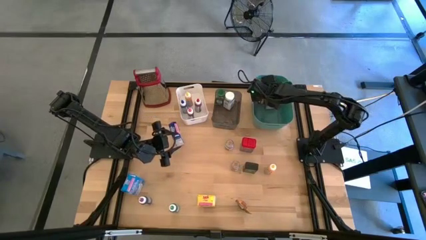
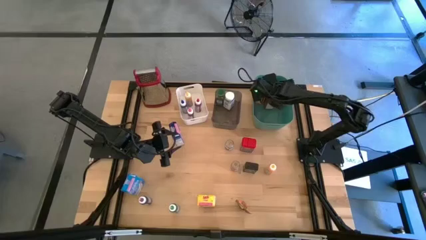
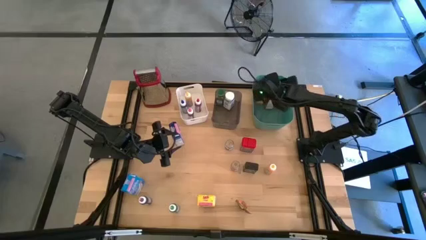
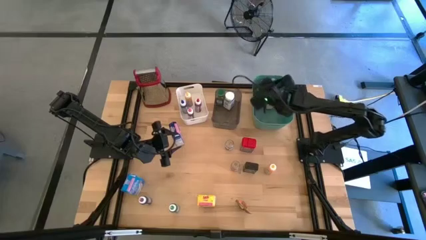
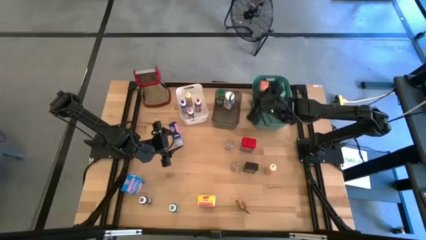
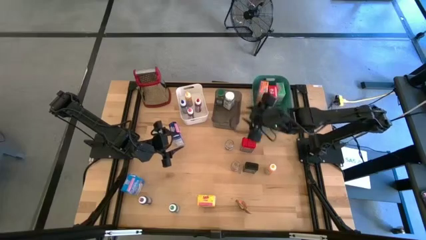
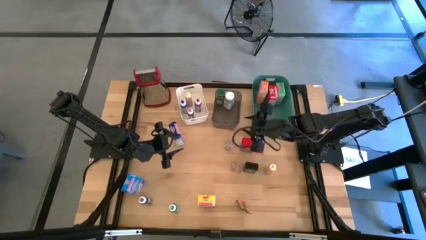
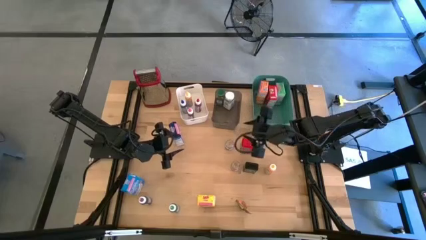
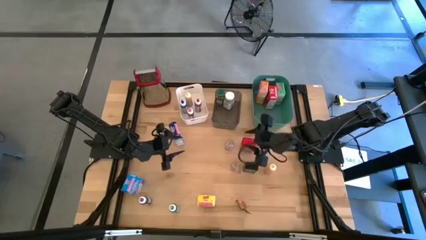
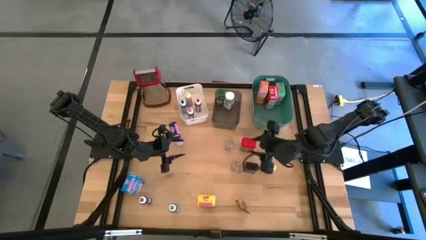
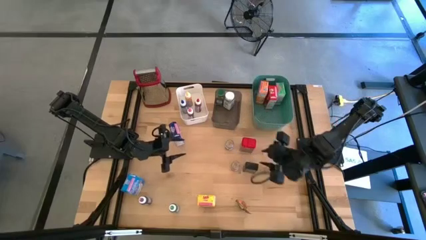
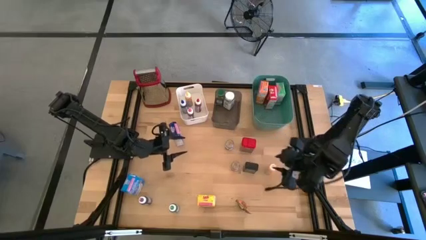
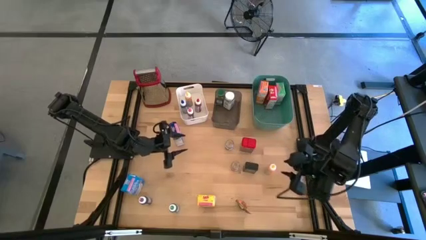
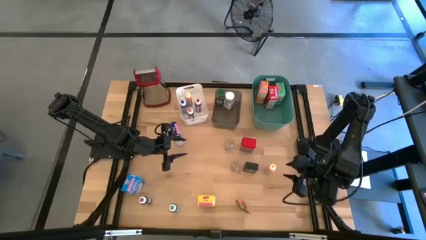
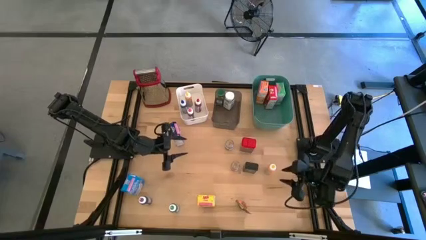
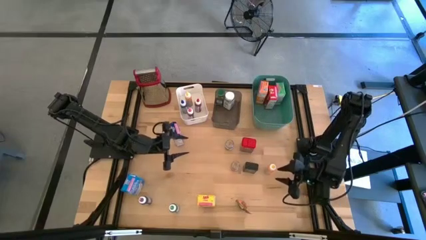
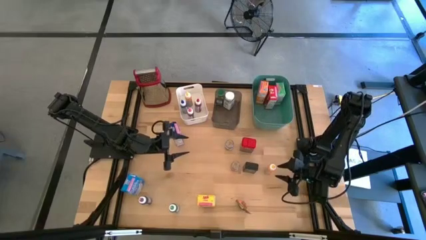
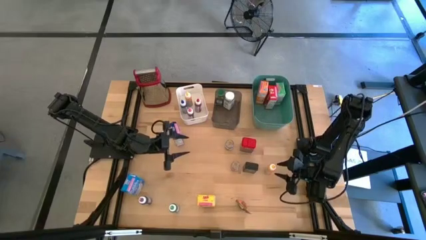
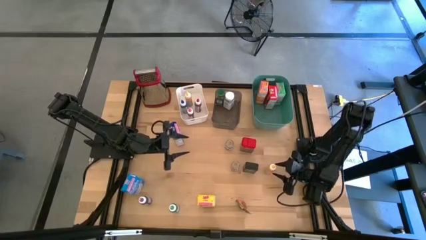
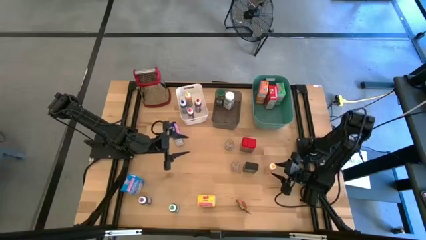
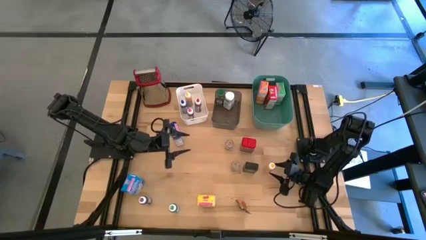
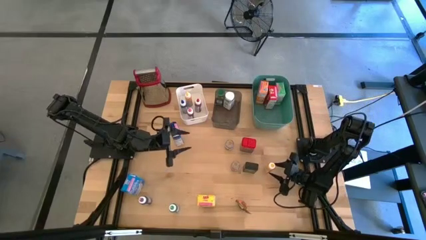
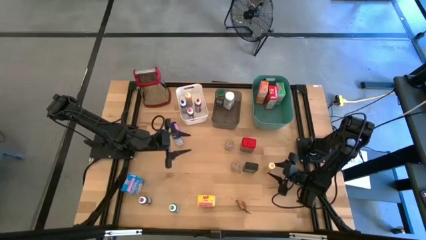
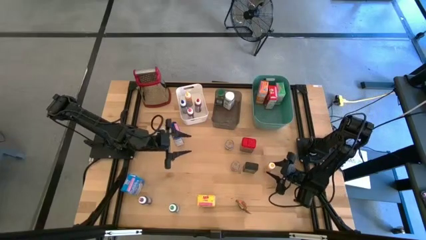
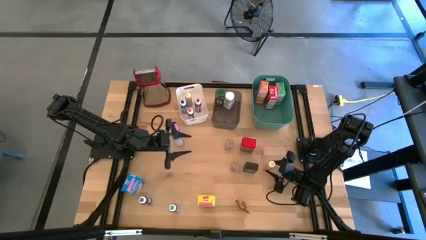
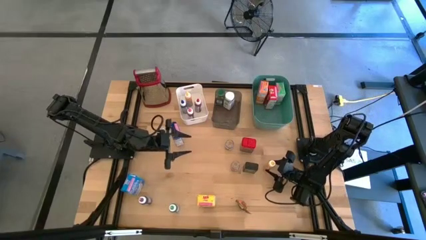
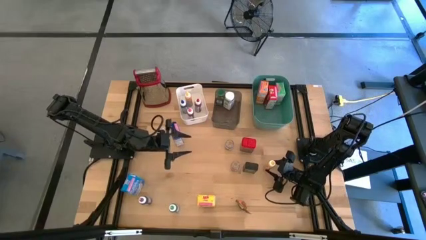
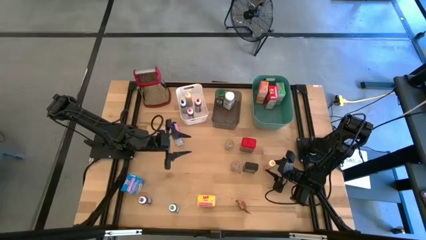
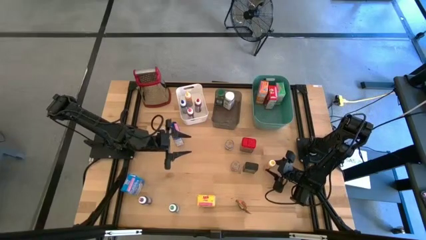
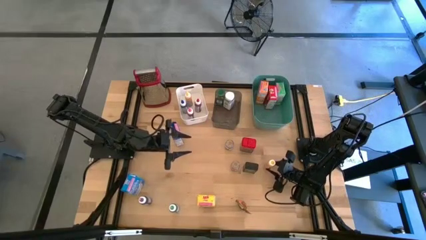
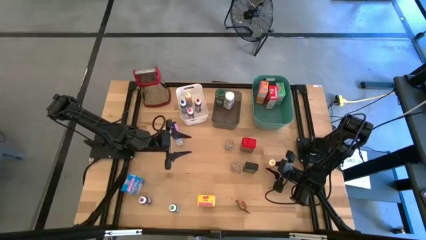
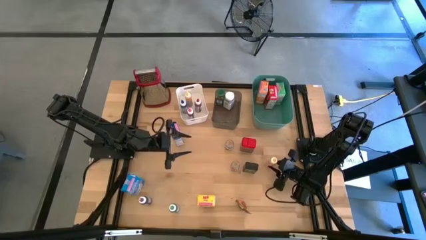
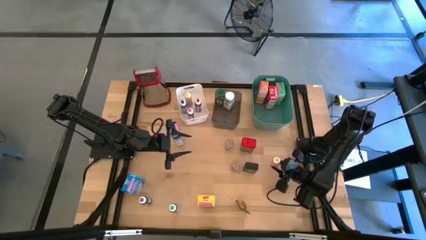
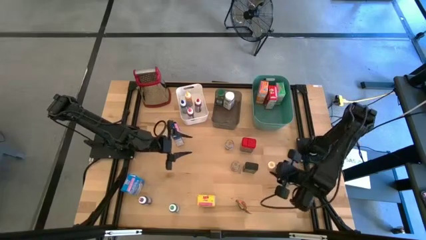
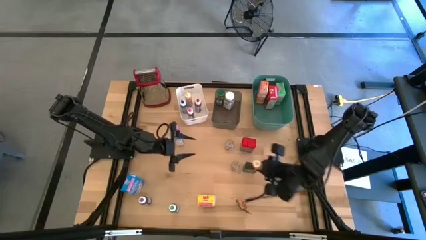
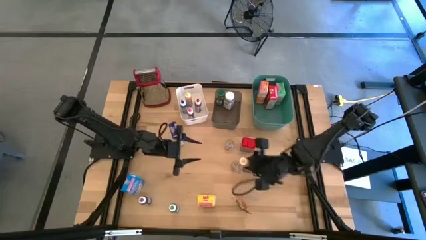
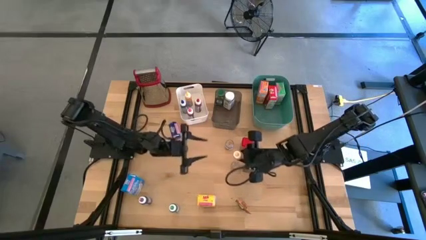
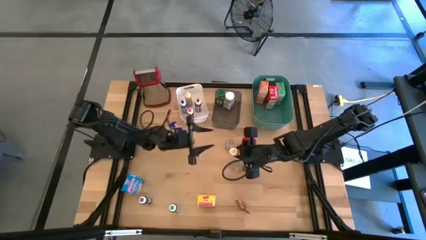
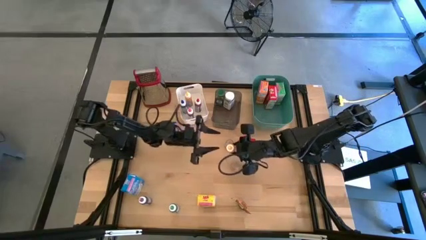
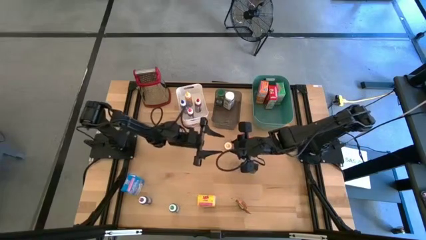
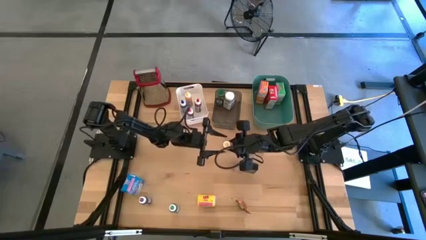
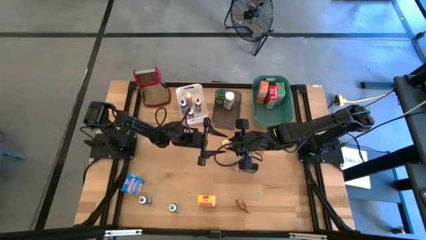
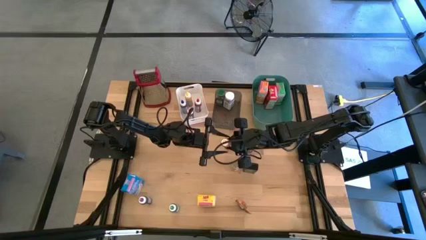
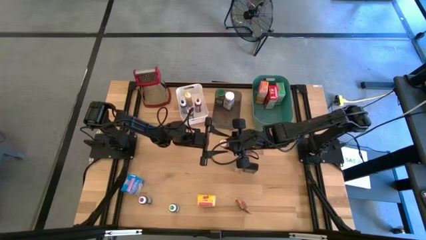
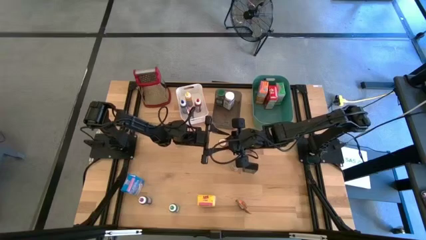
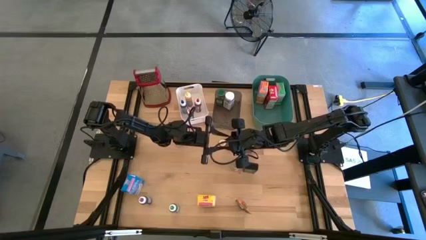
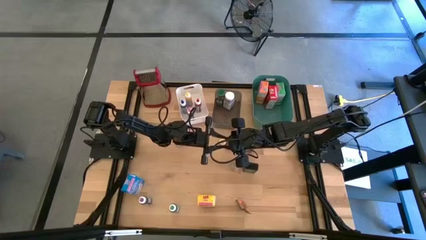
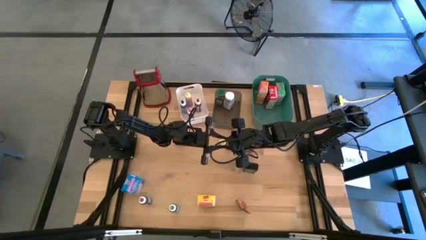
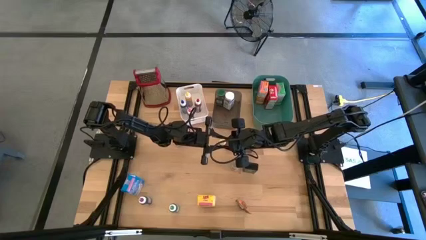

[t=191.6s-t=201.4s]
Task: Pick & Place Kitchen Items
Put the yellow food coloring into the white bin

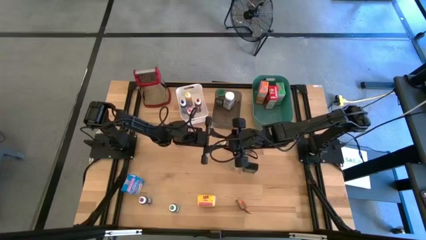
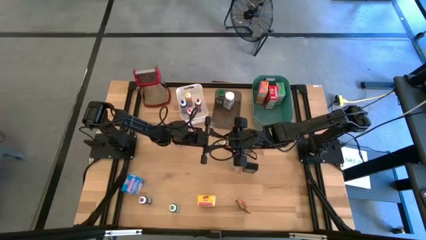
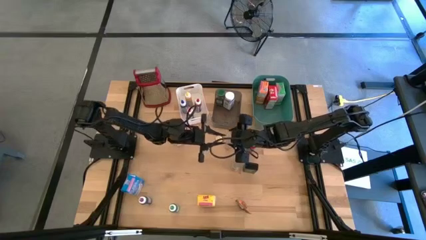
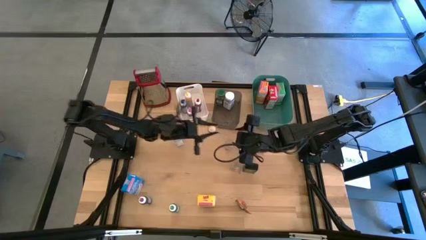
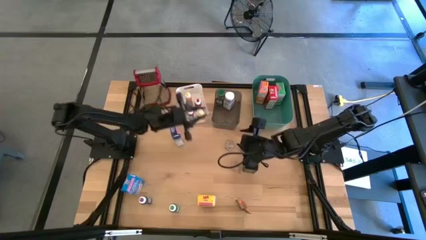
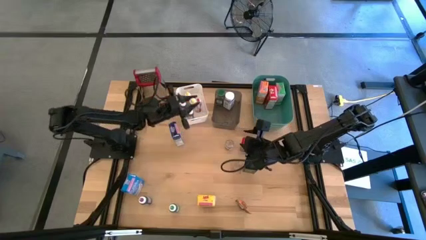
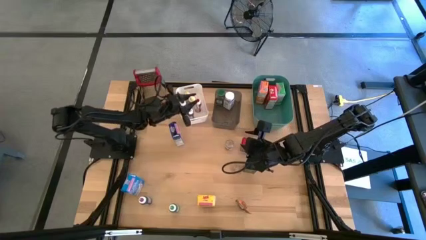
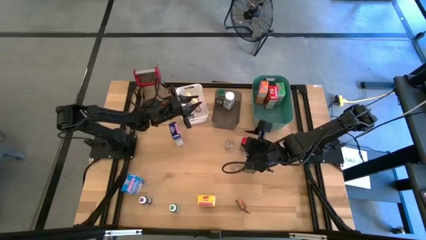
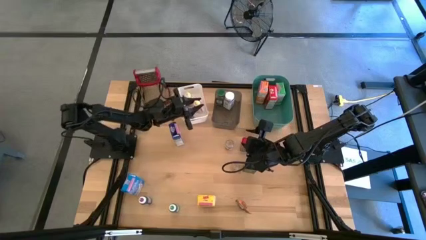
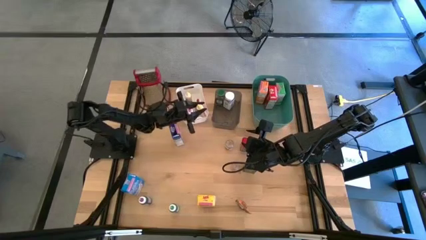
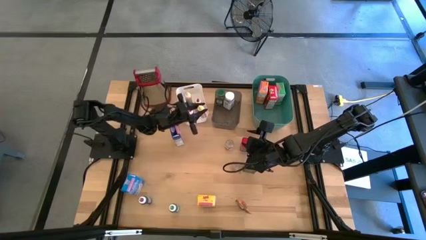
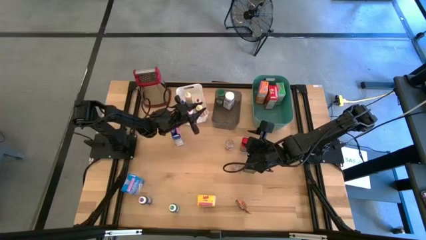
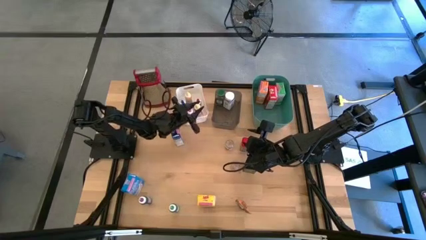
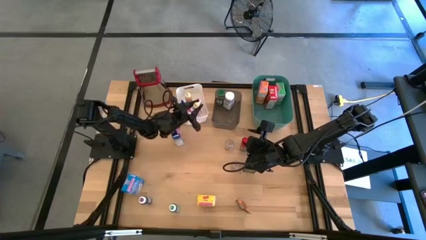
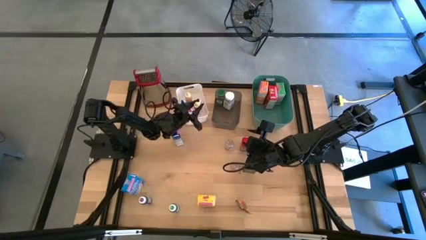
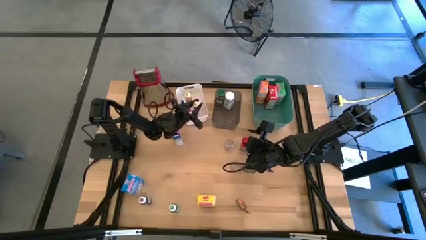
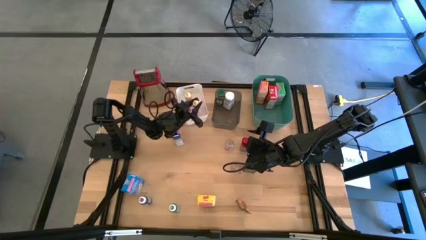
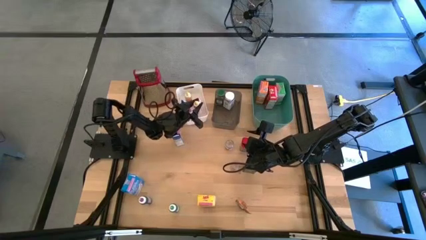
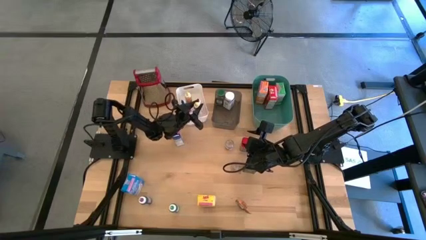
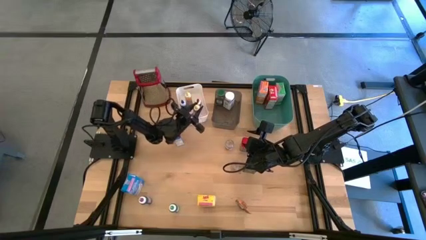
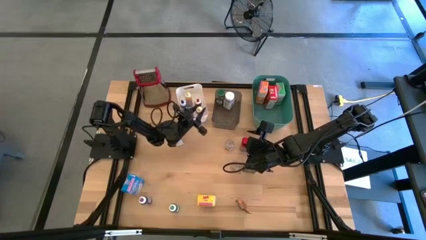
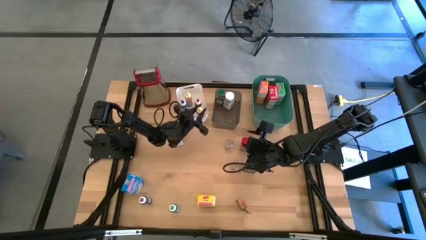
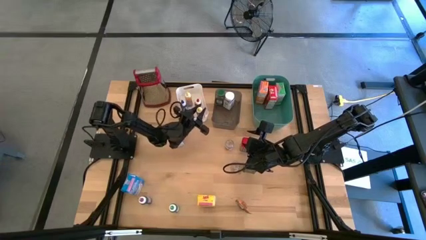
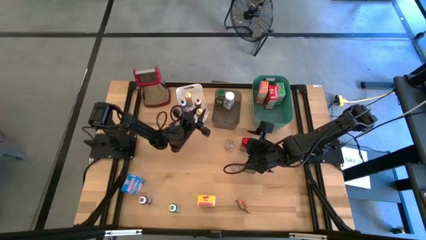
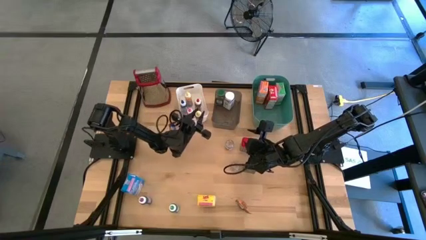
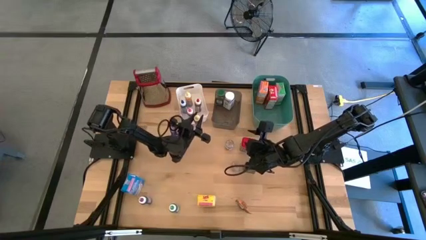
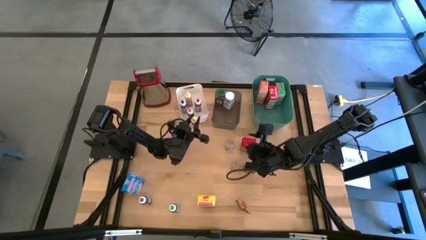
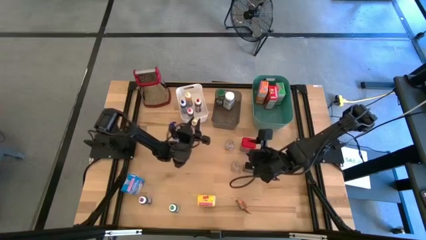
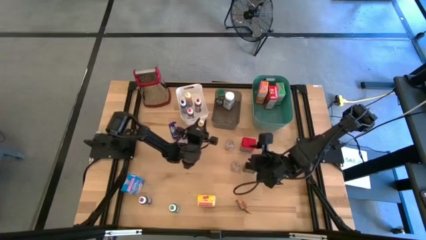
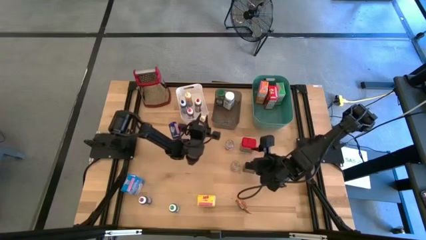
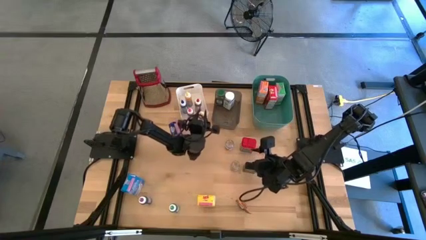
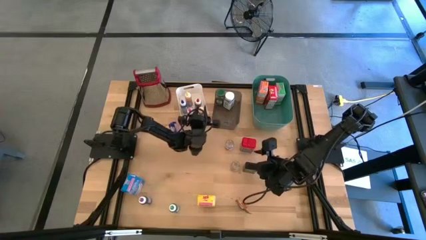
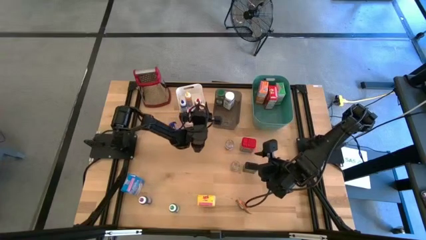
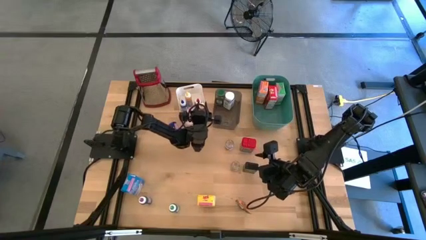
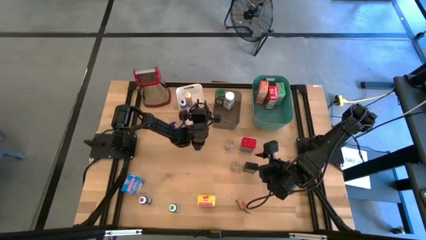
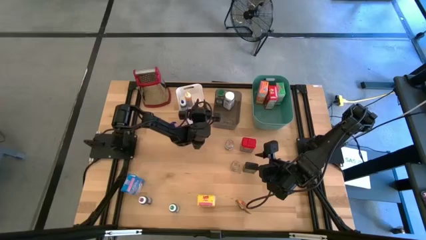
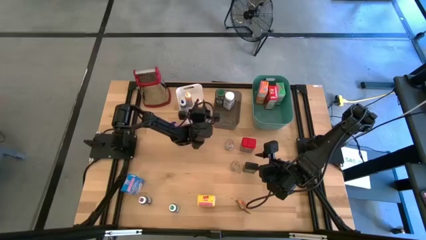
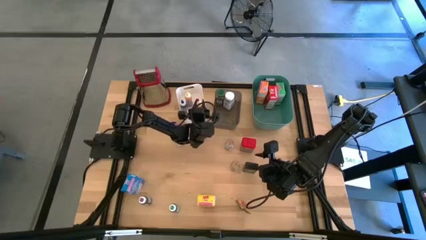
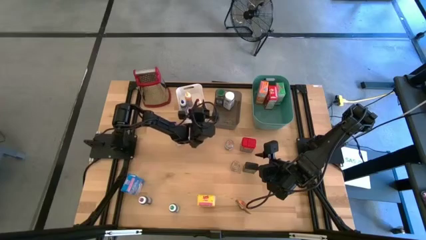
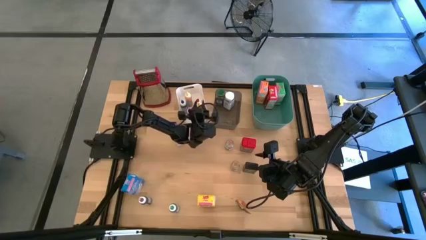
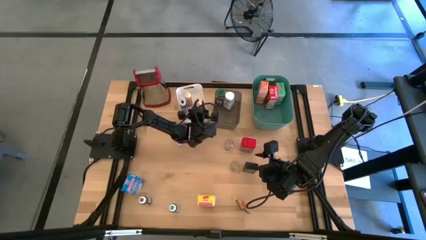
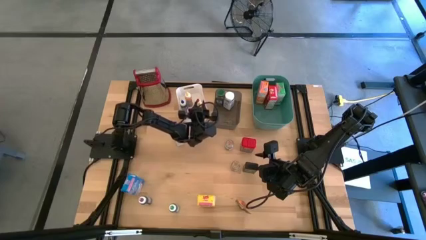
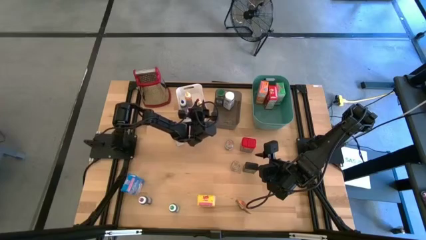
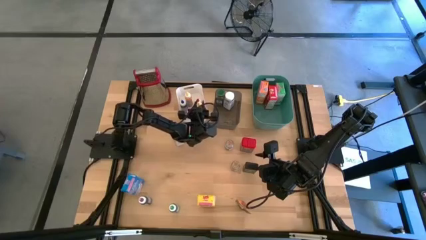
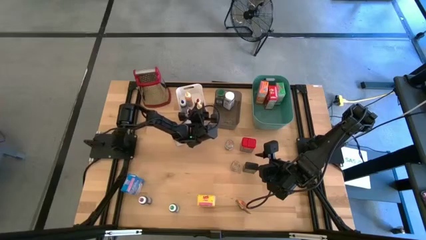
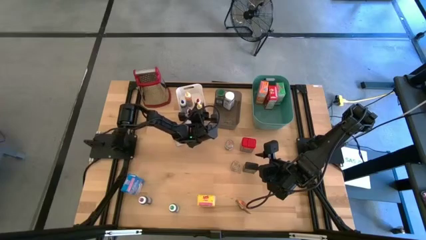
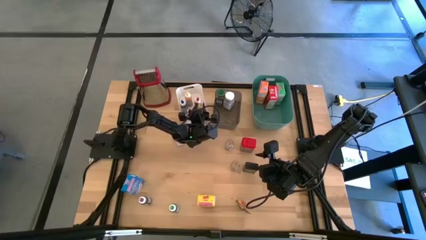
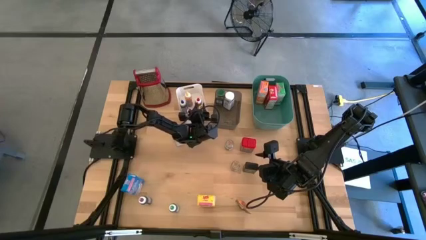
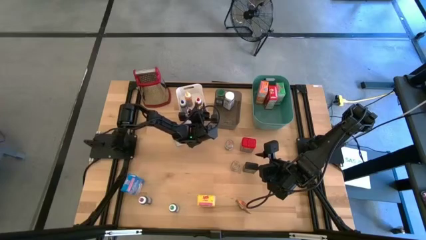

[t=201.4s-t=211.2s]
Put the yellow food coloring into the white bin
